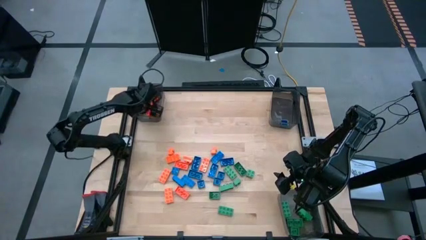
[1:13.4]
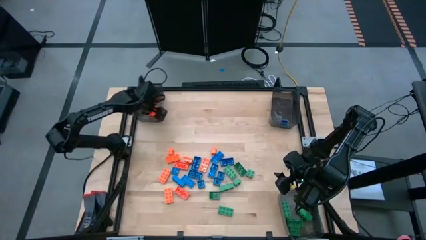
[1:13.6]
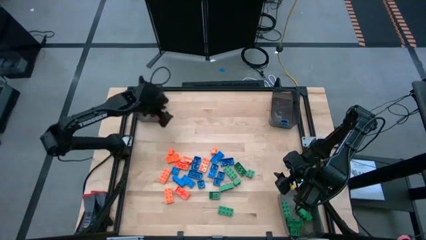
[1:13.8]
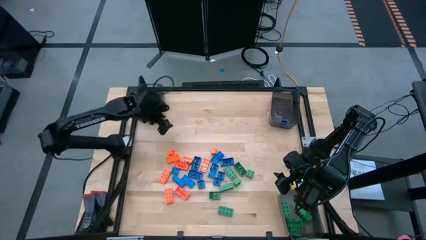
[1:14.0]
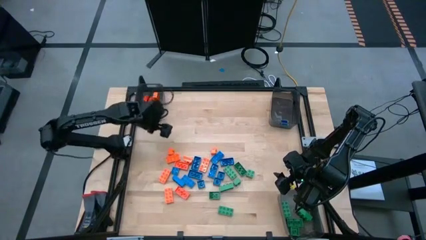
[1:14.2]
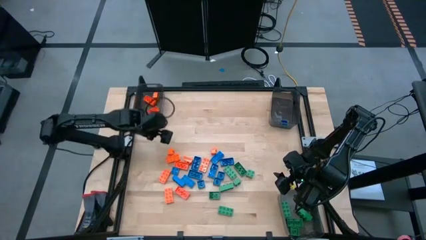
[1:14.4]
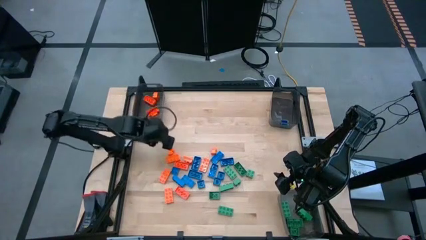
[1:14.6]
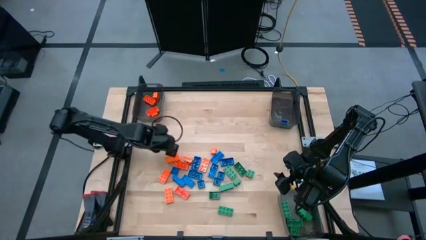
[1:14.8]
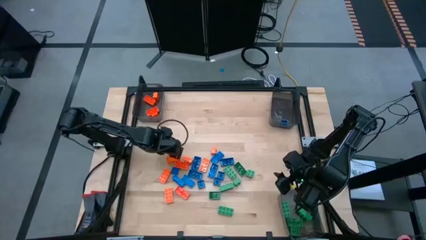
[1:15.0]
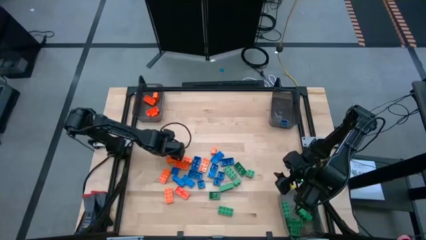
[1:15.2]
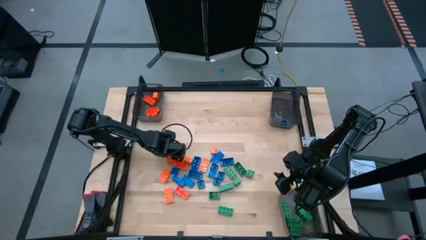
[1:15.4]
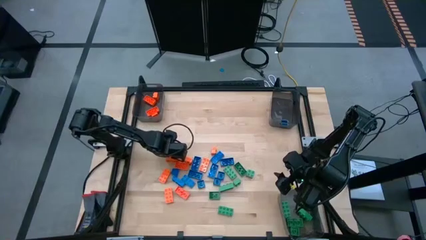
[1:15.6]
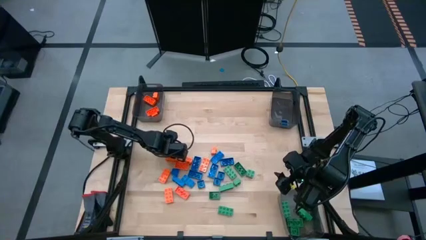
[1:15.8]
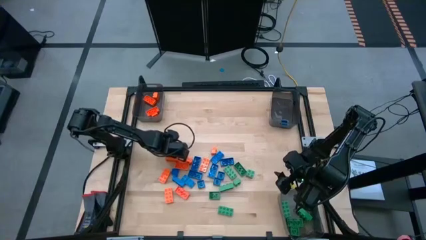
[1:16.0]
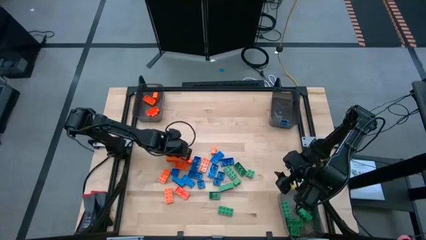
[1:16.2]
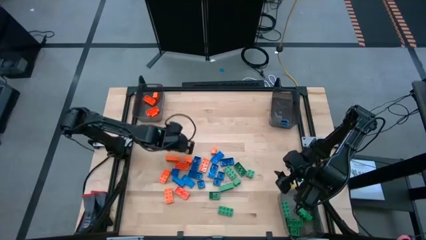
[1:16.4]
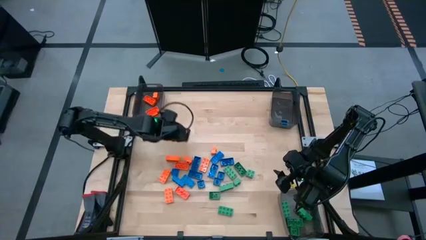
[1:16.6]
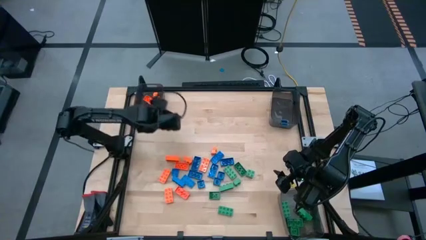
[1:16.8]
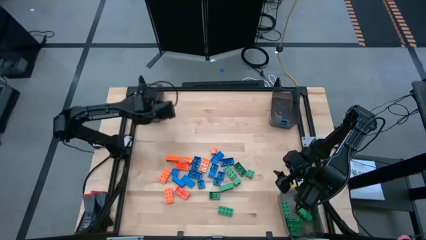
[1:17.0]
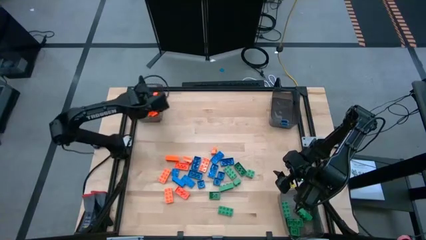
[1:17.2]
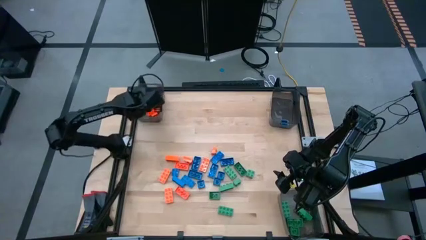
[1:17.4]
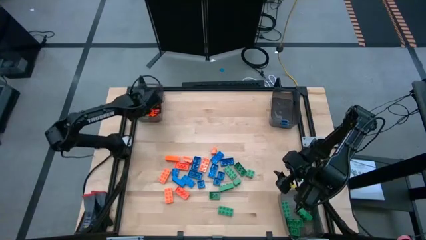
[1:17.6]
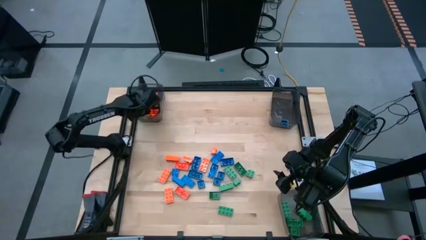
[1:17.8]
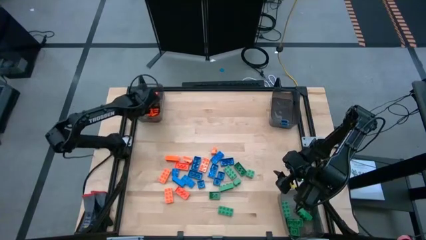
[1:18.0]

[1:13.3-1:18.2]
Task: Sort blocks
Put the orange game piece into the top left black bin

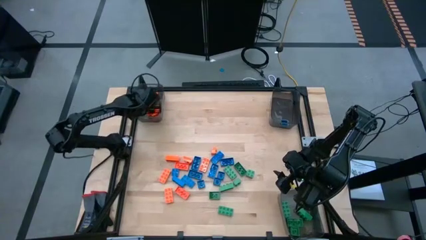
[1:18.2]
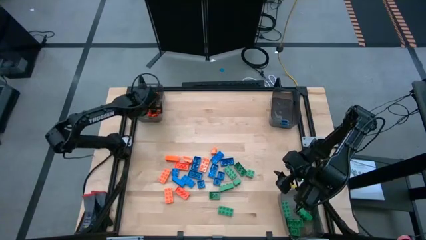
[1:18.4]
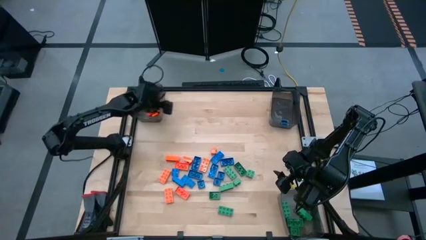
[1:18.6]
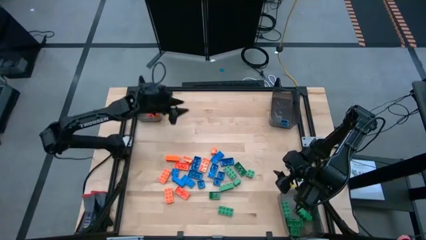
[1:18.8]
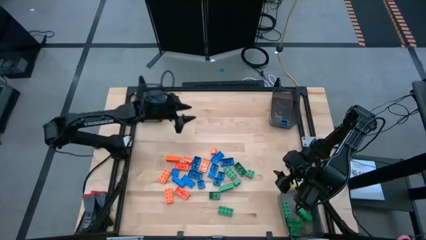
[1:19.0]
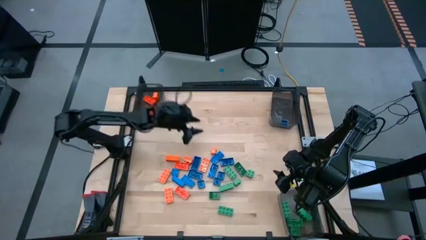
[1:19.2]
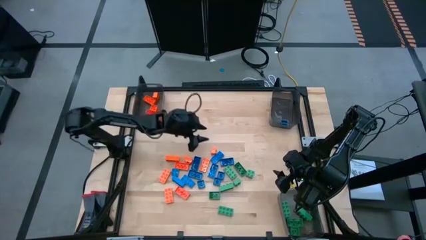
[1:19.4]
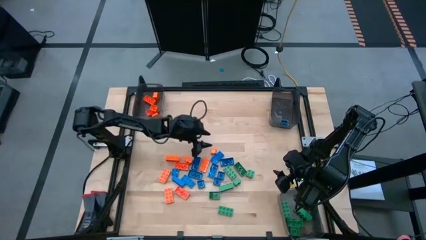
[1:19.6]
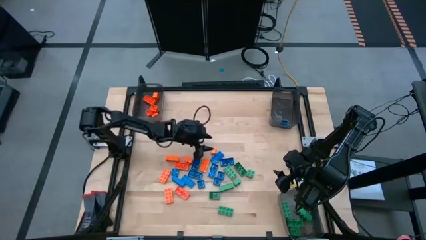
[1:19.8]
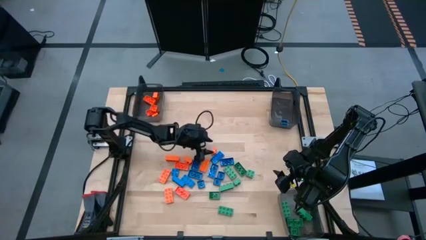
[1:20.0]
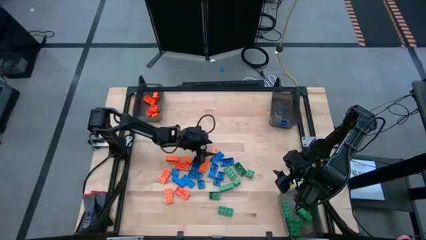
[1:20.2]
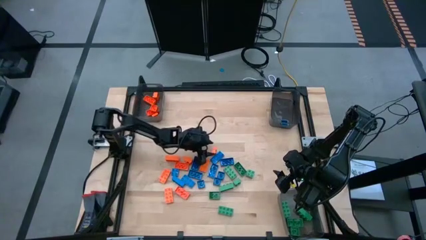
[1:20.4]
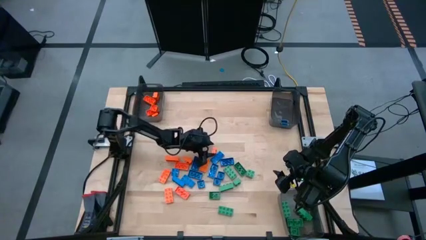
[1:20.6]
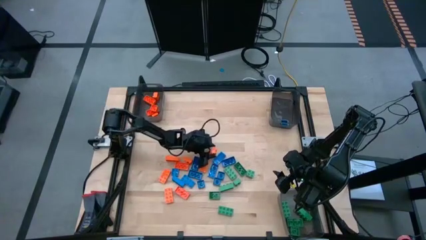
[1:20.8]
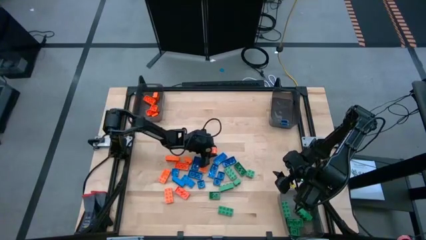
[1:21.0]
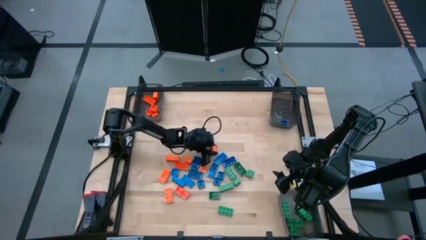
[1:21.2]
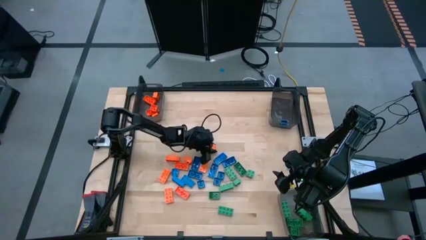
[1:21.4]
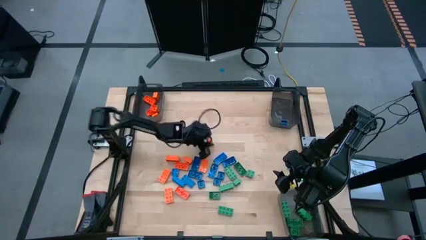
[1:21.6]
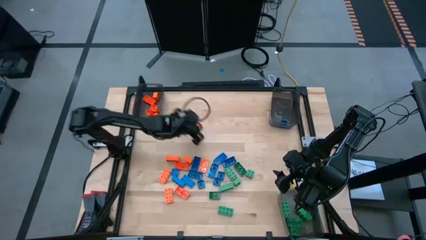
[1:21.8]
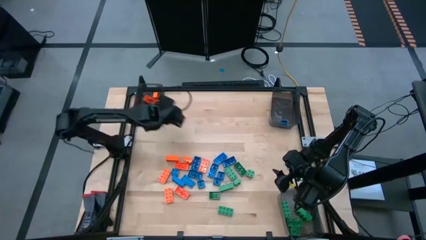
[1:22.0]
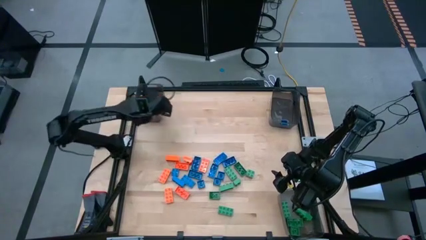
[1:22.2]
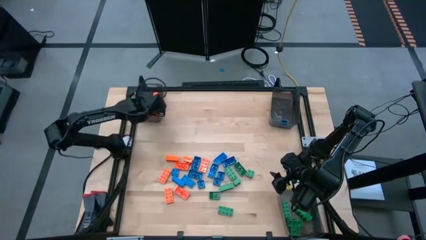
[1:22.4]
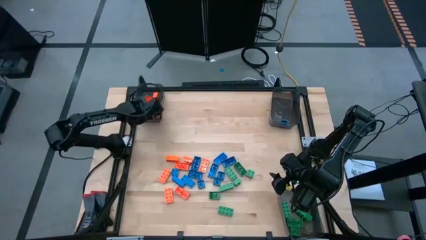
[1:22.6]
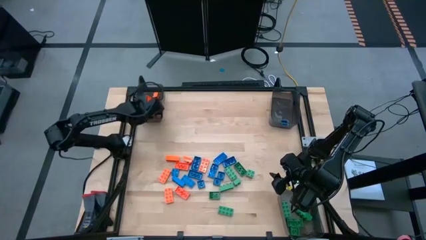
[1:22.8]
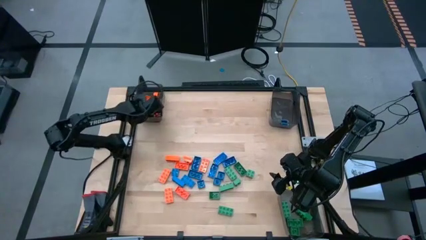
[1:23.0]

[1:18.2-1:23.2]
Put the orange game piece into the top left black bin

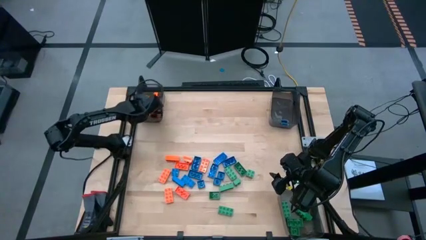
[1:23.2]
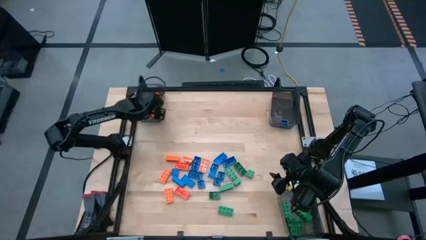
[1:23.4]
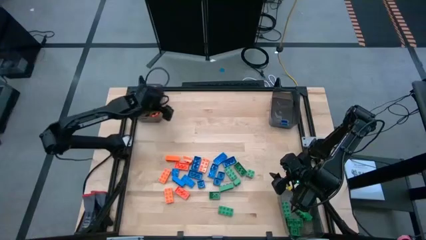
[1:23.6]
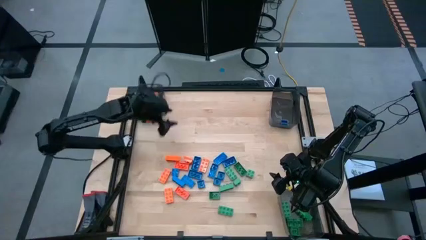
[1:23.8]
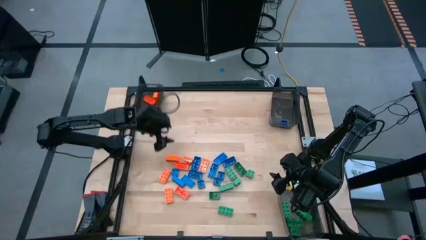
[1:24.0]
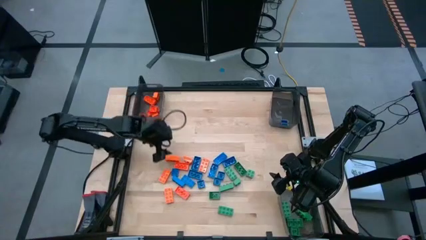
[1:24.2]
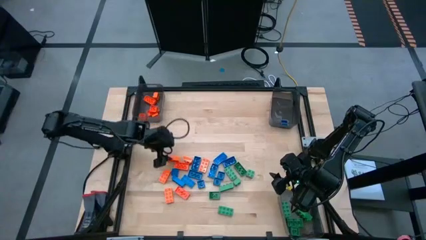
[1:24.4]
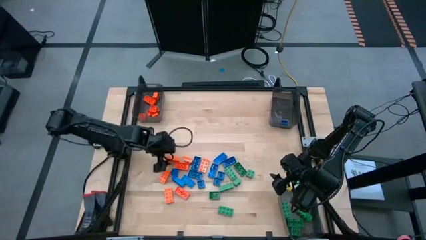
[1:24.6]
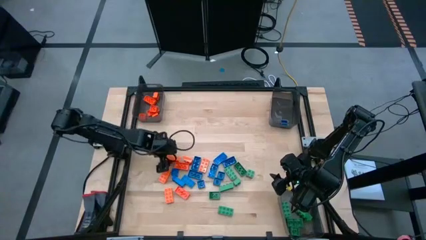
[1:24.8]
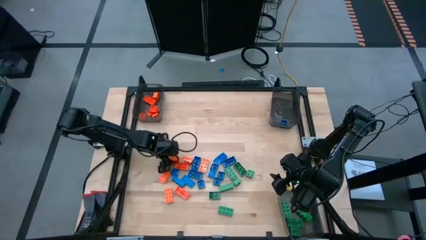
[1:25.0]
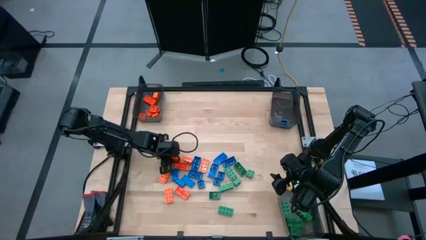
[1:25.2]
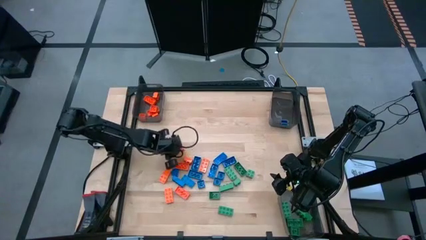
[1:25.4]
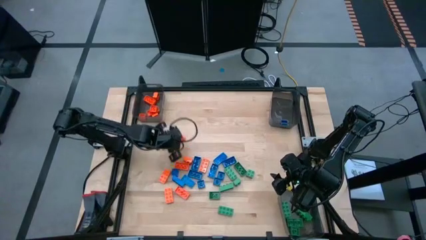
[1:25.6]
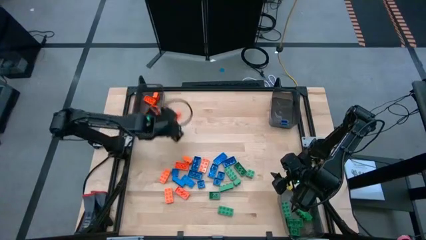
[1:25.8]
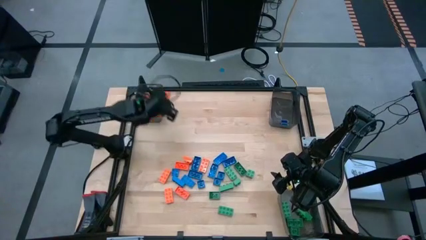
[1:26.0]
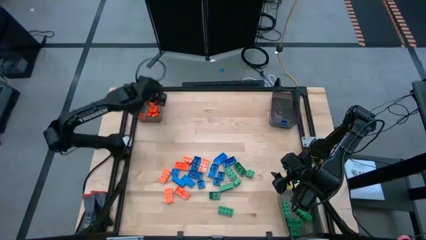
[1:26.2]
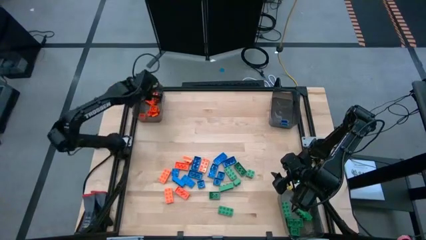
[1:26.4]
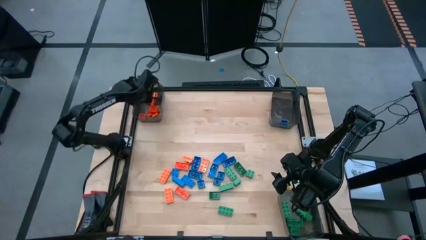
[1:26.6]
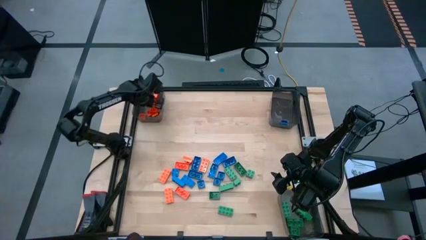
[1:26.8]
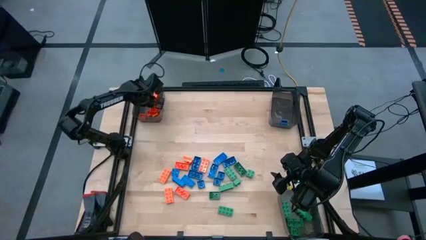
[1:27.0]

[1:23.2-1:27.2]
Put the orange game piece into the top left black bin

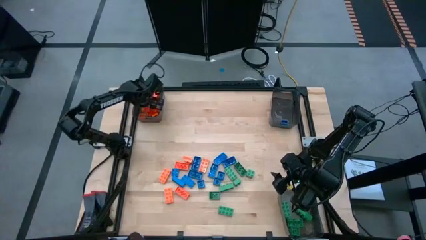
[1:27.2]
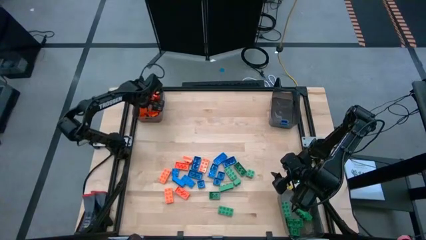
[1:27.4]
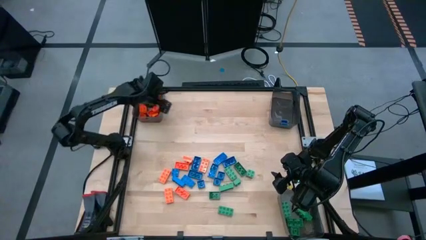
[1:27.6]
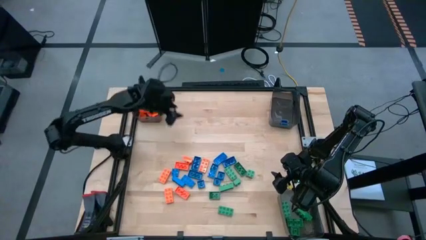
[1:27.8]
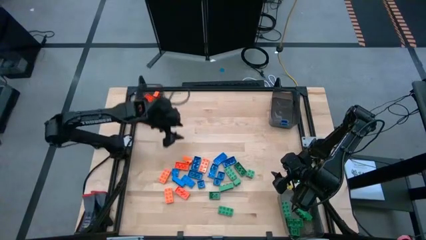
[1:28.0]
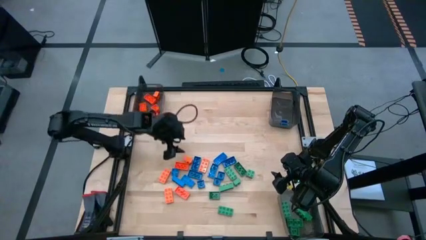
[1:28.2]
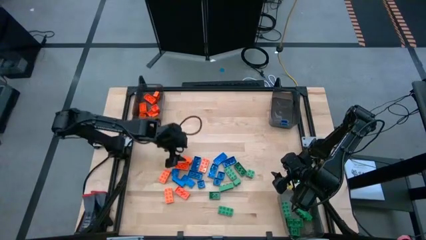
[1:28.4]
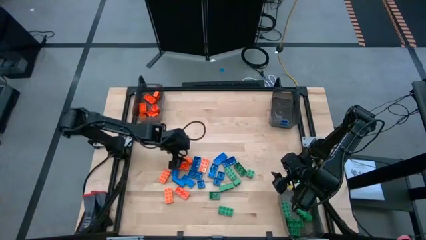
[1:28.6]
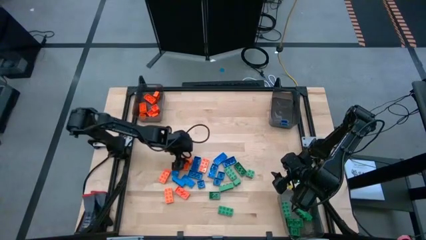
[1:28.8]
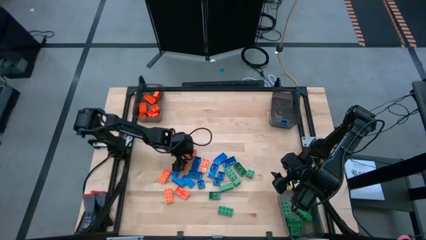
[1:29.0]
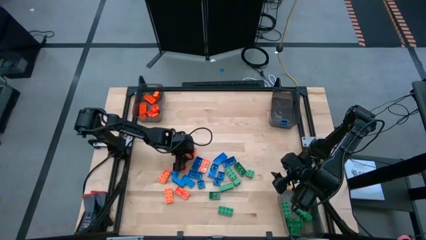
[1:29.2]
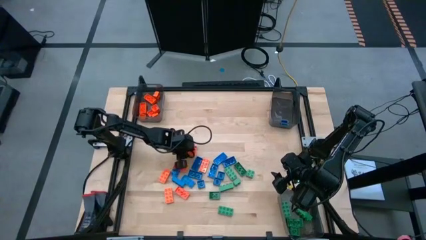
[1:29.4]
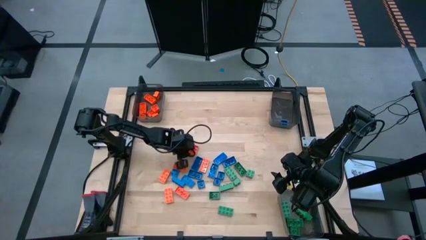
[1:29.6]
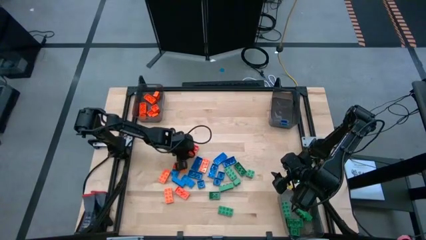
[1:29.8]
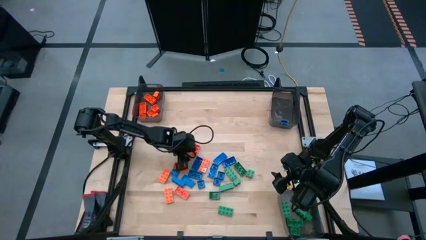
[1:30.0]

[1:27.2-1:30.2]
Put the orange game piece into the top left black bin
